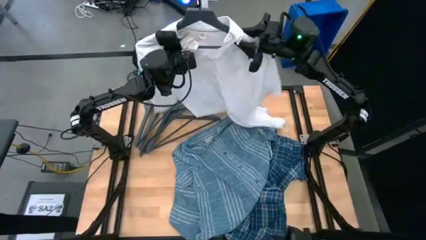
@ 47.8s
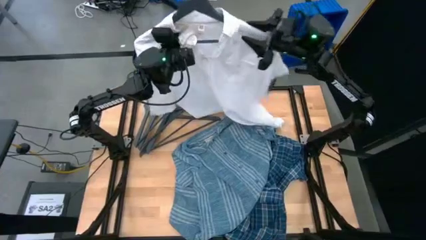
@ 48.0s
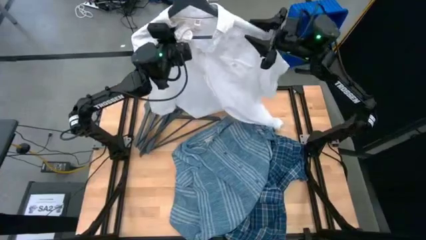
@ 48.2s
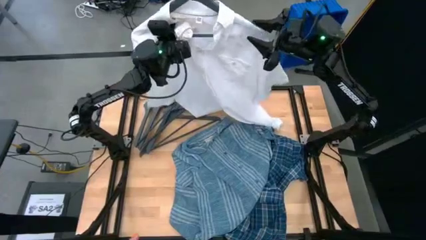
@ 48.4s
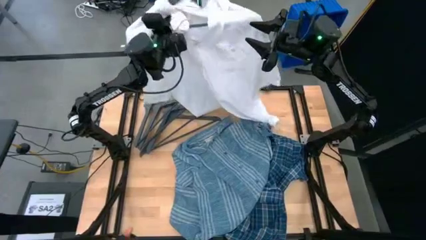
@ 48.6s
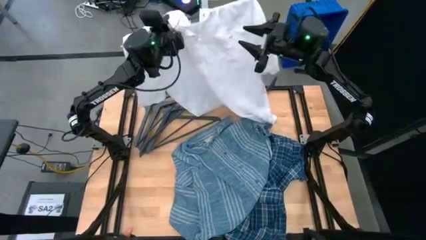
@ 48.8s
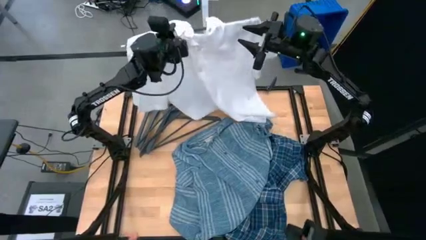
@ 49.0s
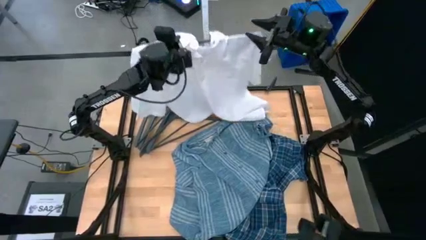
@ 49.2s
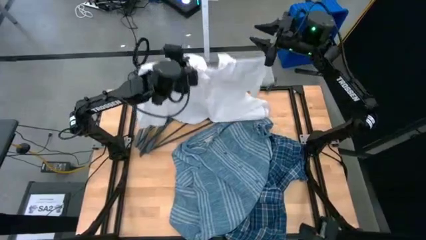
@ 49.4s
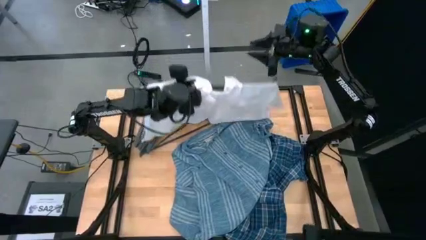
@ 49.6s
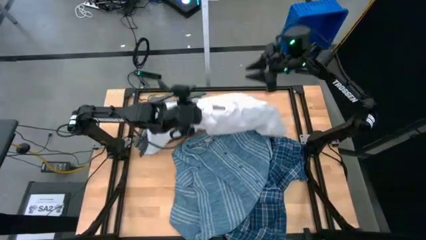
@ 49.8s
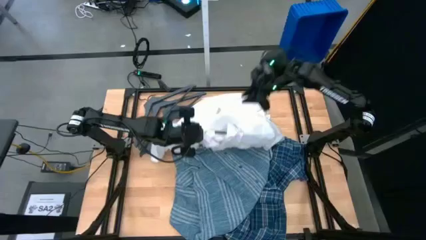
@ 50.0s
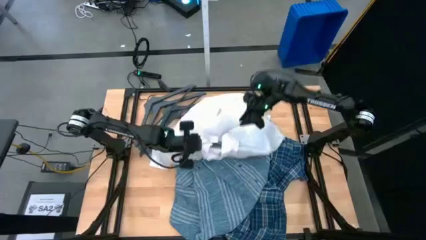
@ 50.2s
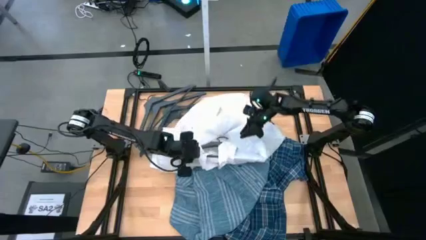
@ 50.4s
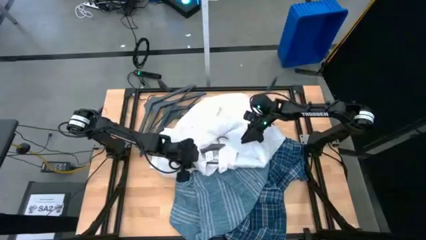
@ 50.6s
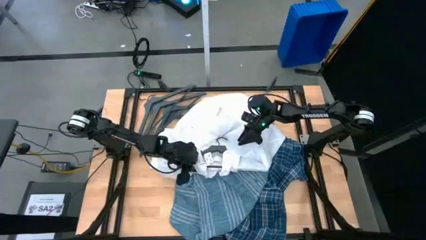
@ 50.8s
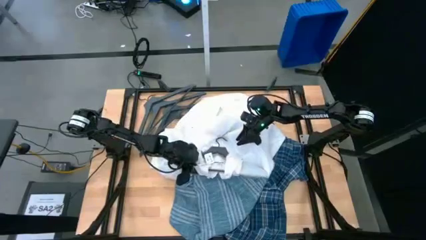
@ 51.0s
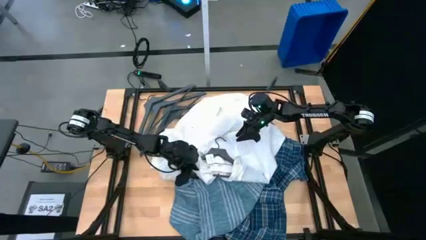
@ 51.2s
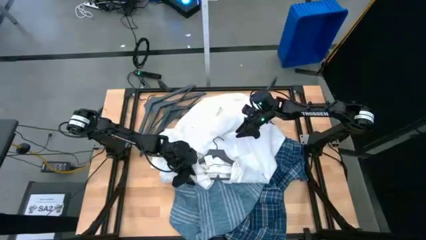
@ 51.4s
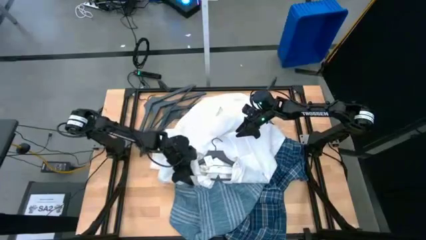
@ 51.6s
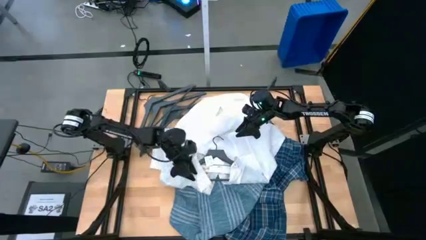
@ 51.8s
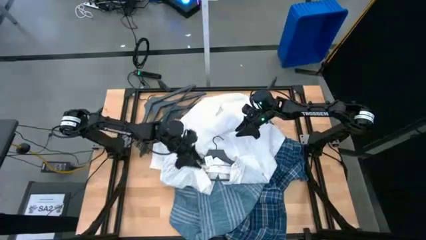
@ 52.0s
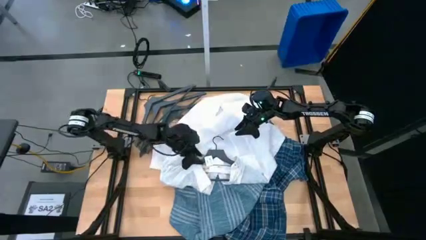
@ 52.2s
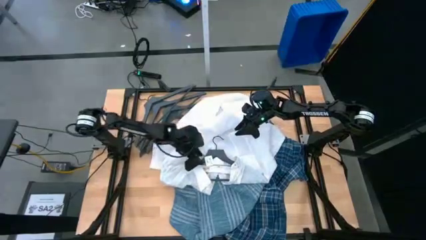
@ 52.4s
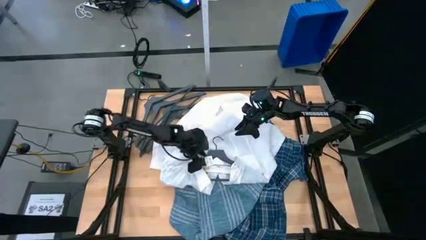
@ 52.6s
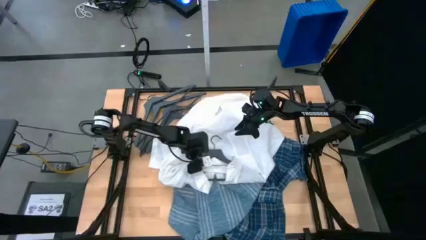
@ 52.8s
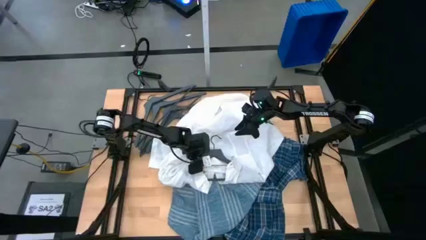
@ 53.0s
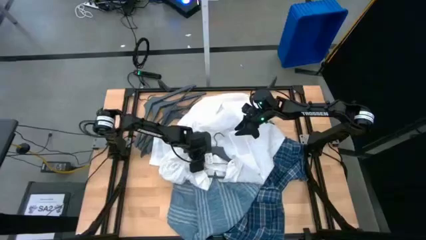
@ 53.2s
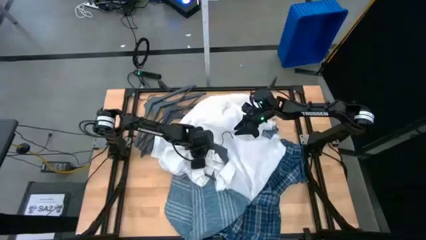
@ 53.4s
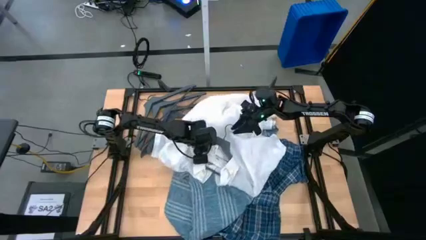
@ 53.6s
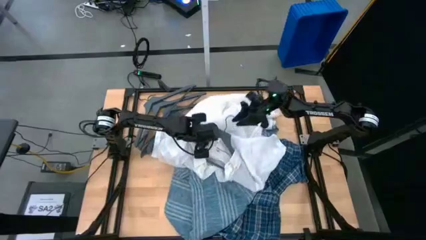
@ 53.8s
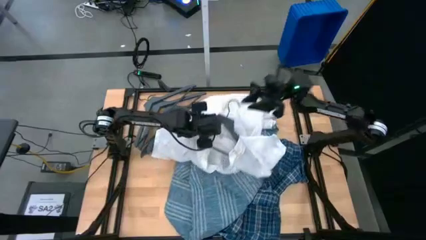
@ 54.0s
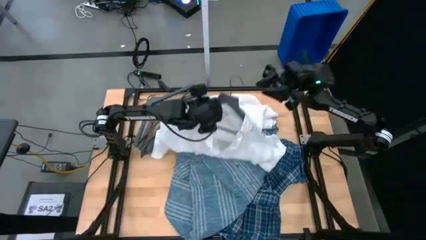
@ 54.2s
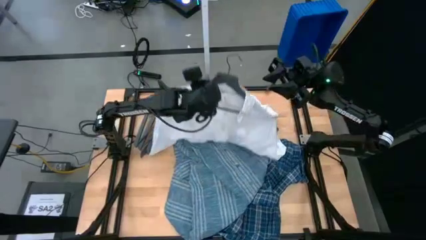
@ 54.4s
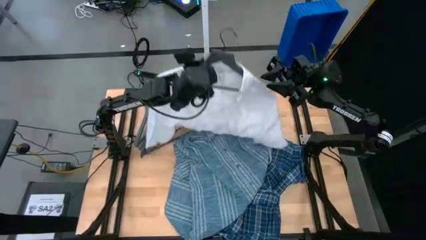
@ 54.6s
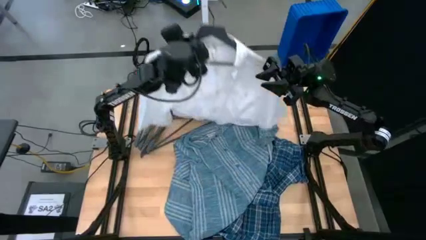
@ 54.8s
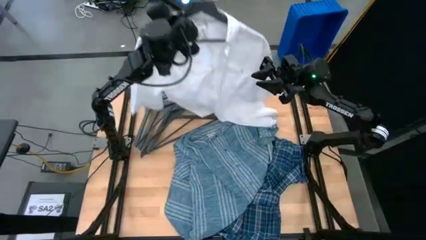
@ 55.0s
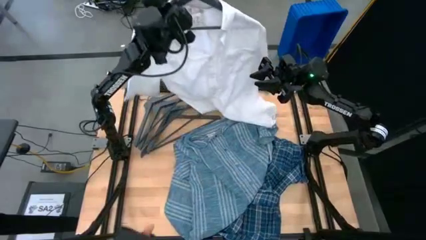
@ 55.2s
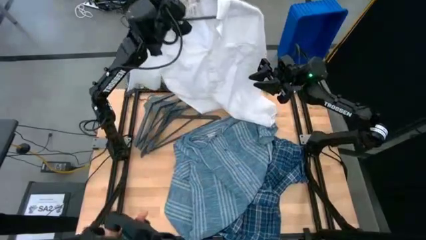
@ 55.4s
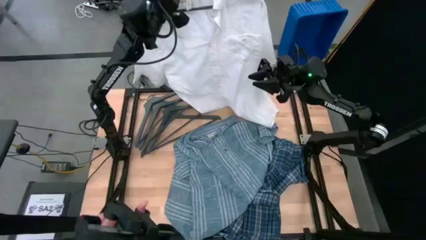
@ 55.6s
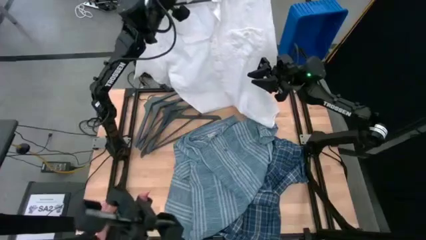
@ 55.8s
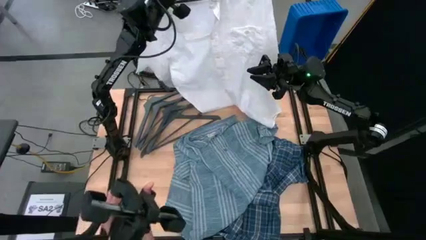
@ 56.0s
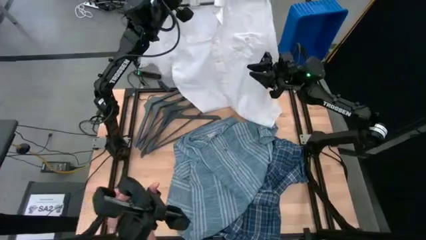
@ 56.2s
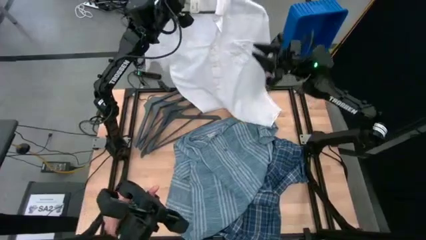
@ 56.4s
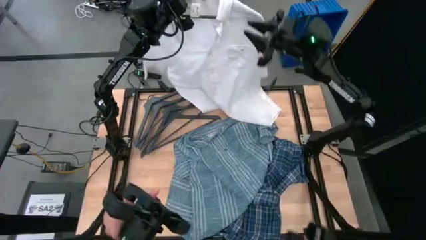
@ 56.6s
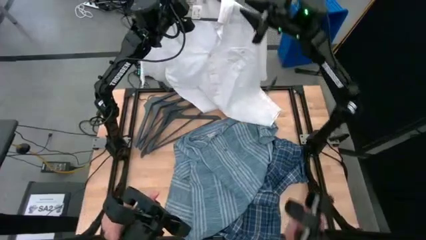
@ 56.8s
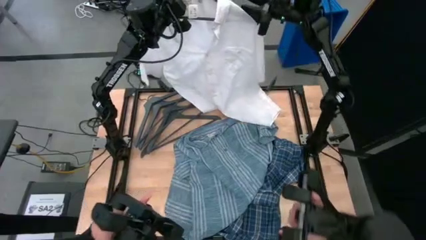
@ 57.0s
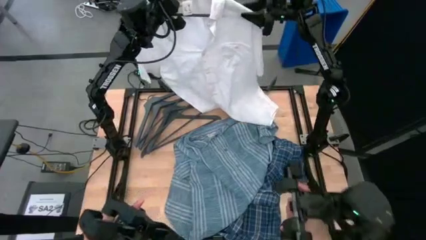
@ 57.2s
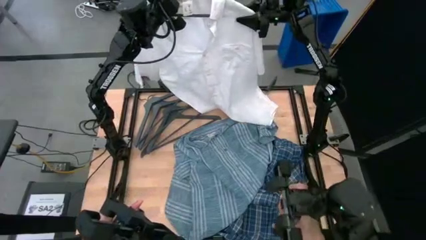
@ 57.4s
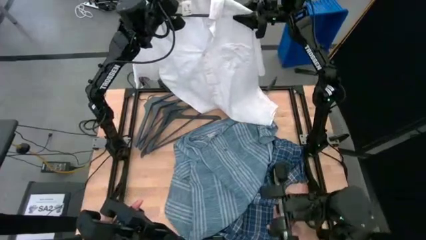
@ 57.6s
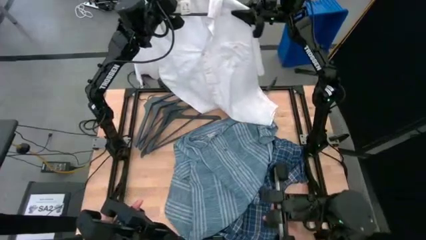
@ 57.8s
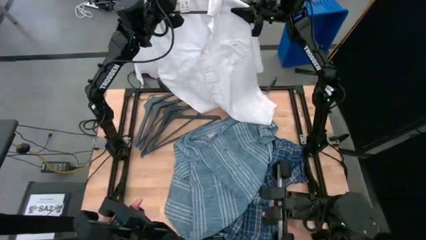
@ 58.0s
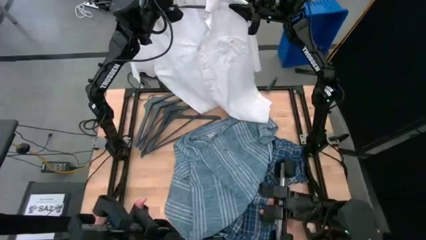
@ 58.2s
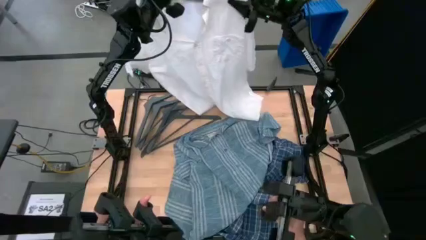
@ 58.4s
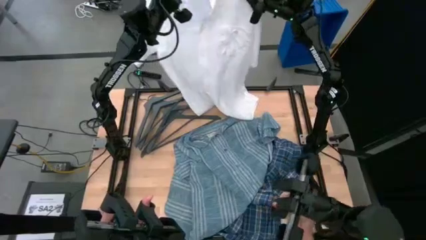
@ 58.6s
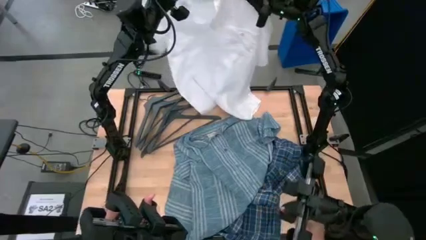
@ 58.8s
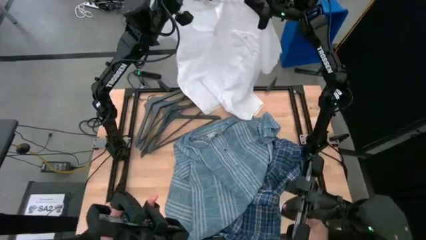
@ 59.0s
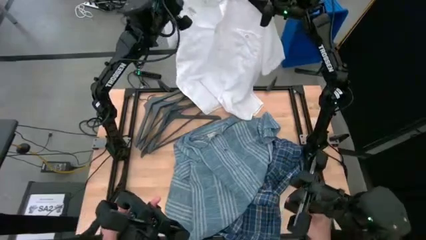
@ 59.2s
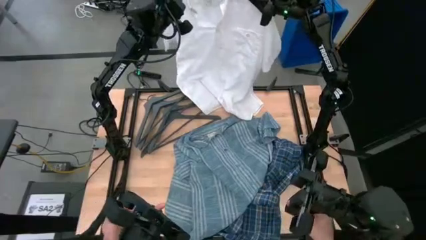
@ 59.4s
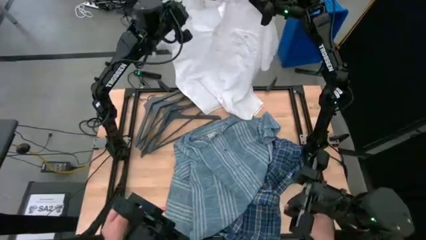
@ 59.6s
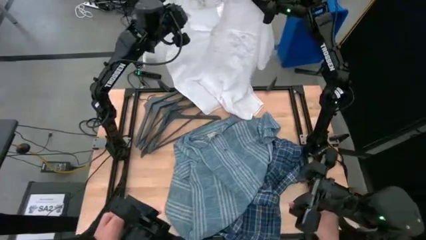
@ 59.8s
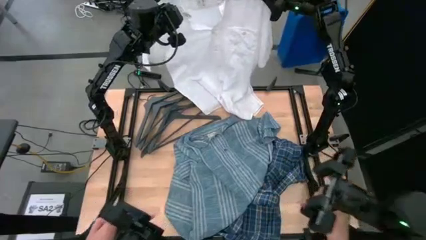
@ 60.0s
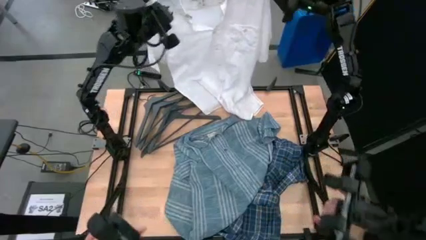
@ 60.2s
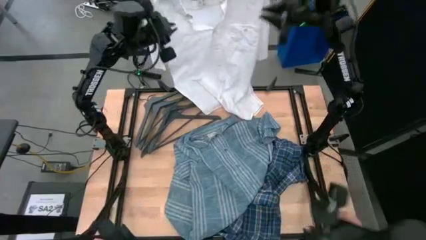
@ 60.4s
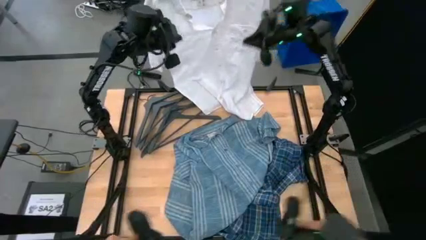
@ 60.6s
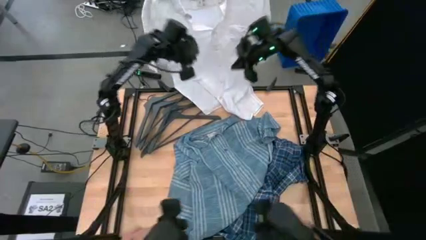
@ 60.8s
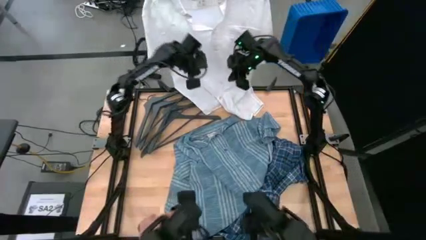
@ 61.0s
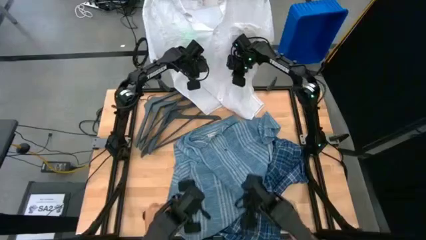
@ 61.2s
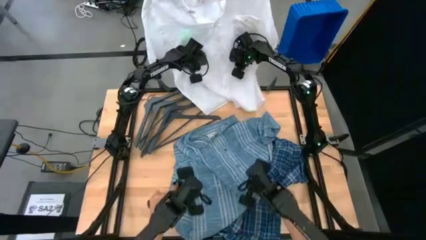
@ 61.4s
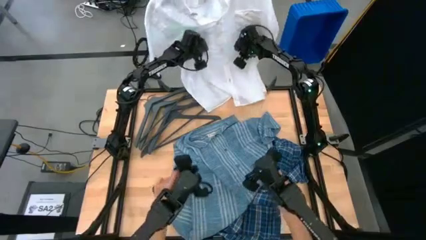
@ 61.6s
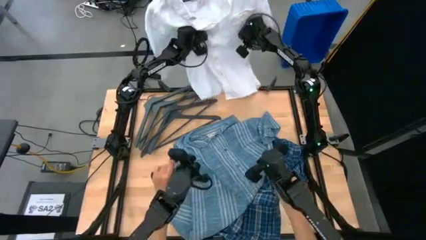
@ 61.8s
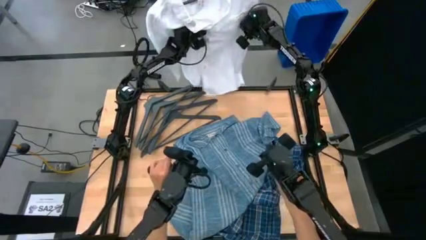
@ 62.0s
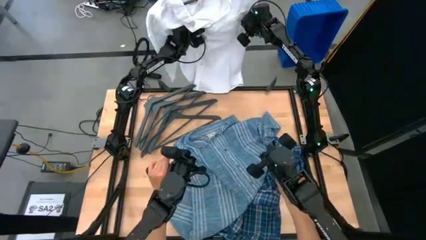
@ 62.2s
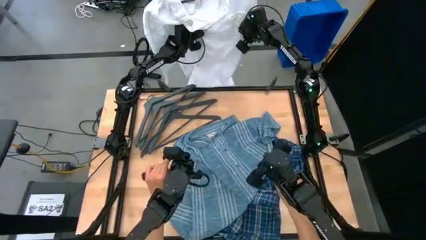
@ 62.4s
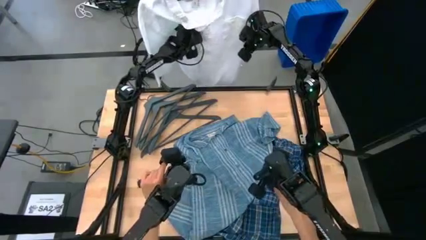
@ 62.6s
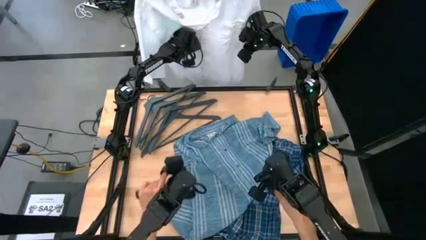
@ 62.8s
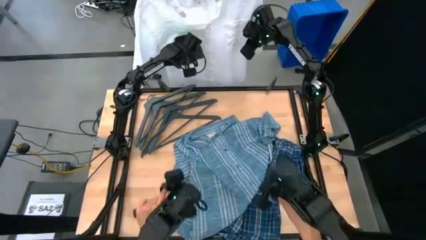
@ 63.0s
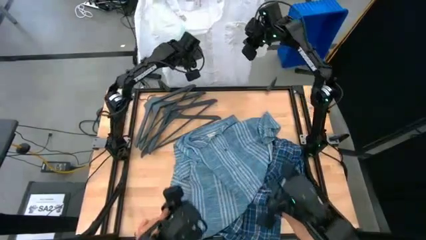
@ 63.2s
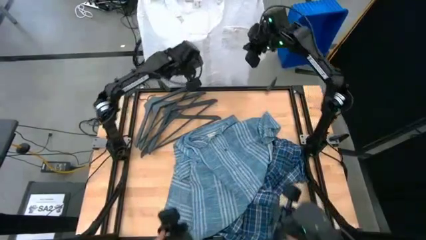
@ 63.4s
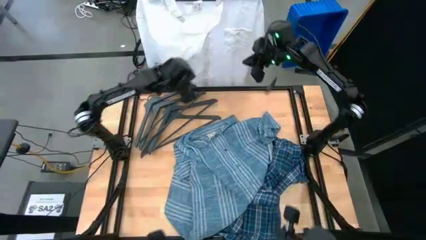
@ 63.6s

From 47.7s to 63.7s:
Task: Hang clothes
Hang the white shirt on the hanging rack

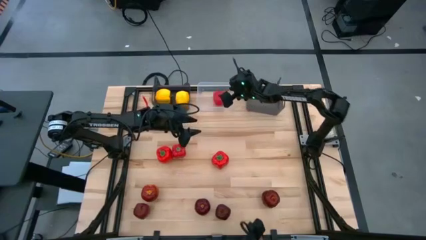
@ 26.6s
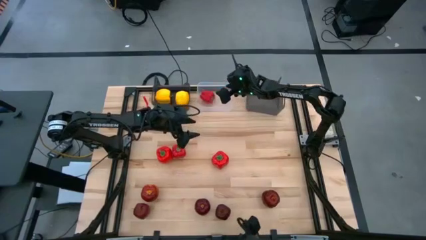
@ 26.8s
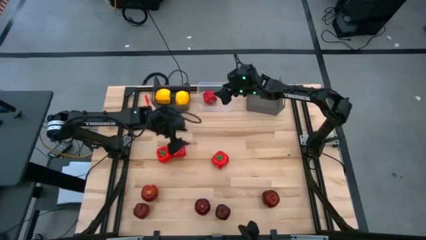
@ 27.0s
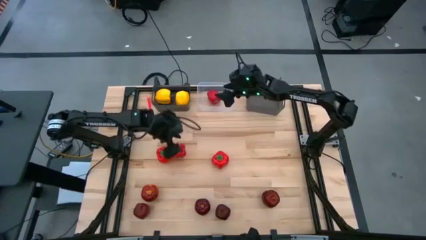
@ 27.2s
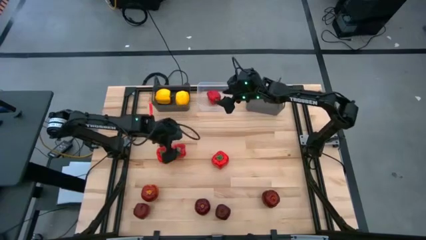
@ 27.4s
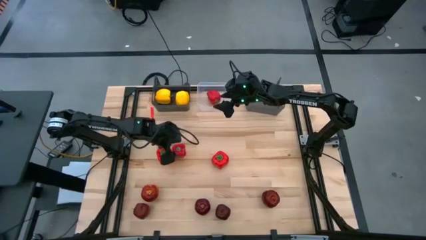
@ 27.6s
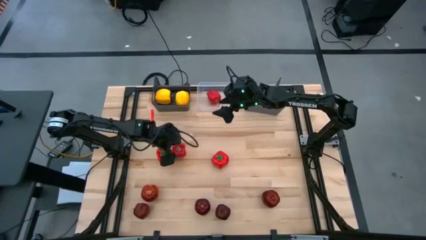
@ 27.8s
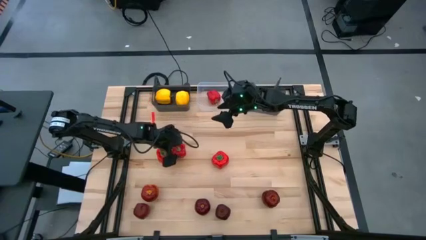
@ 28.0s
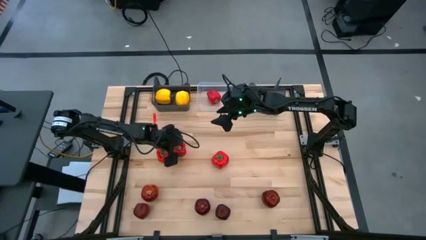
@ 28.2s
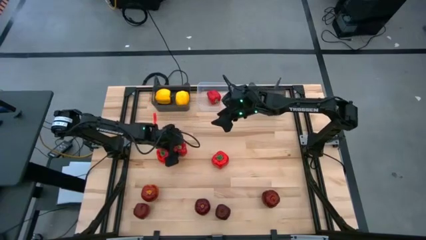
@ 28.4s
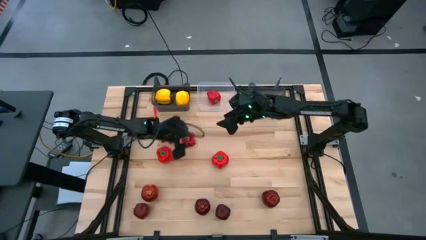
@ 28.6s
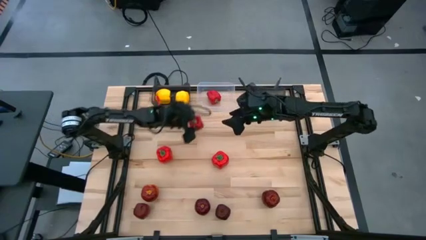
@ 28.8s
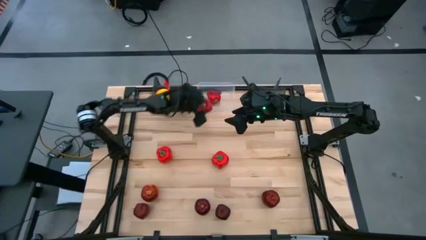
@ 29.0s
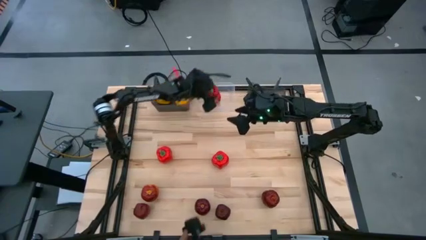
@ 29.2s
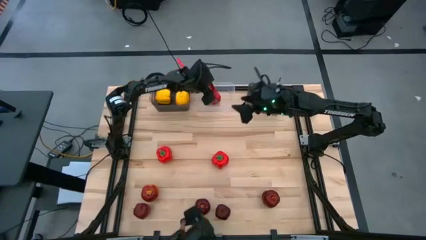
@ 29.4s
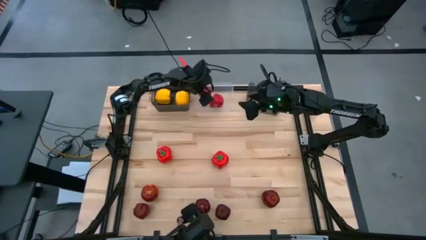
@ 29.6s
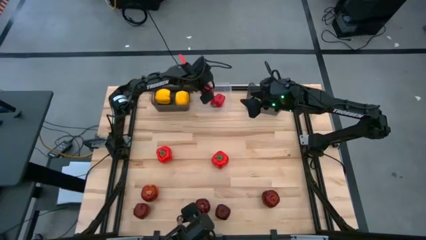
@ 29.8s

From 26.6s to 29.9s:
Task: Sort produce into baskets
Put the middle red bell pepper into the transparent bin
